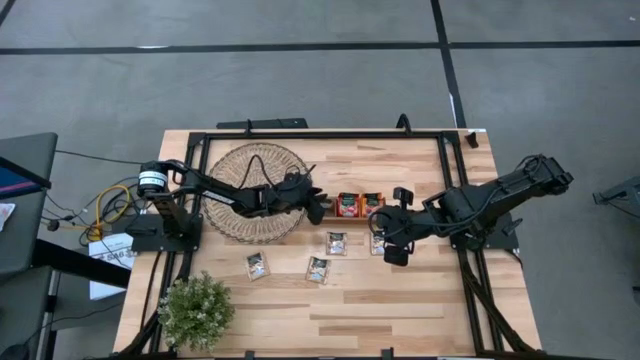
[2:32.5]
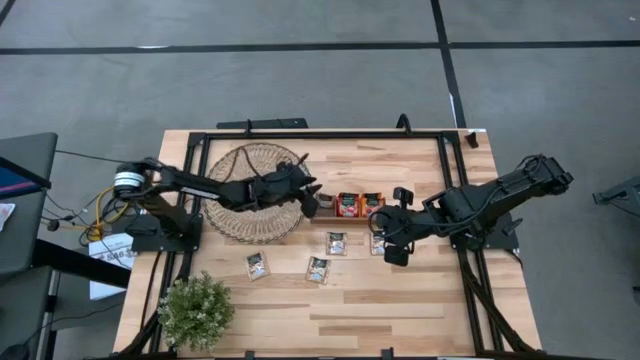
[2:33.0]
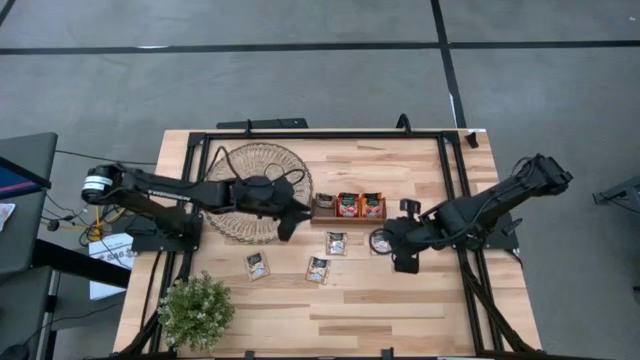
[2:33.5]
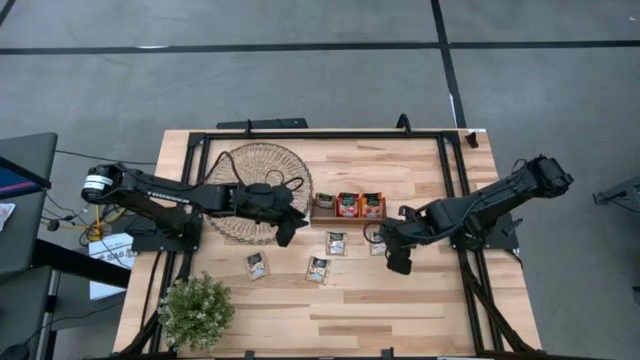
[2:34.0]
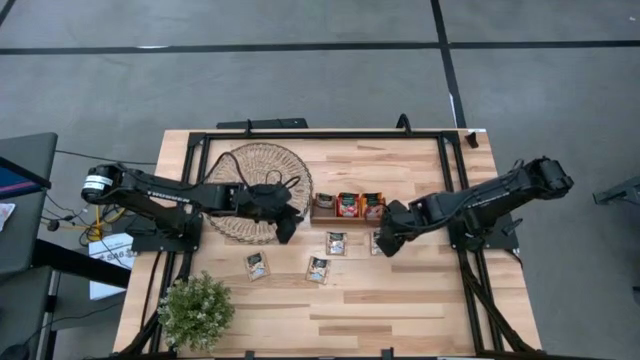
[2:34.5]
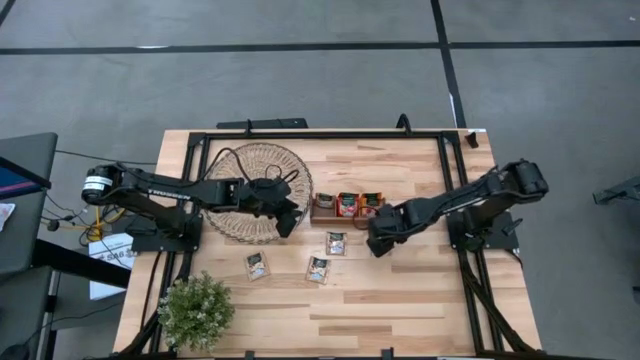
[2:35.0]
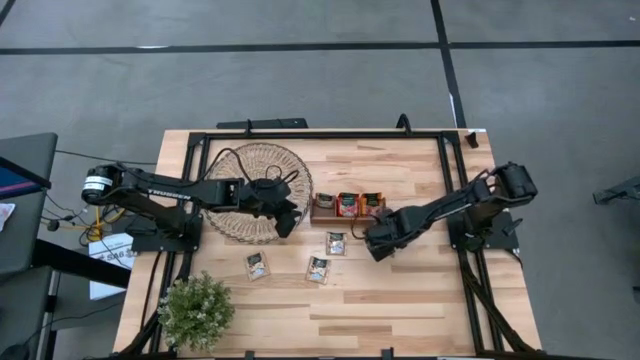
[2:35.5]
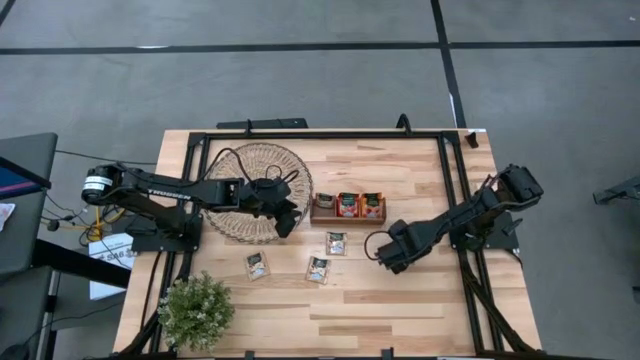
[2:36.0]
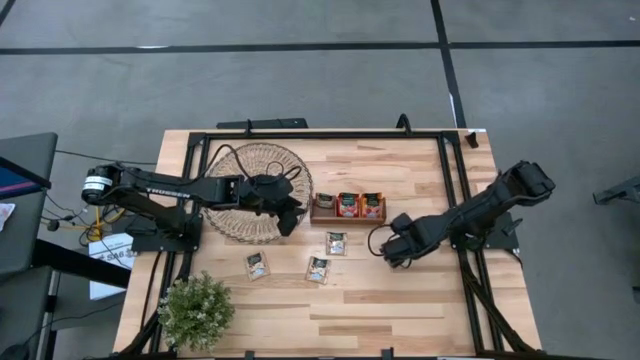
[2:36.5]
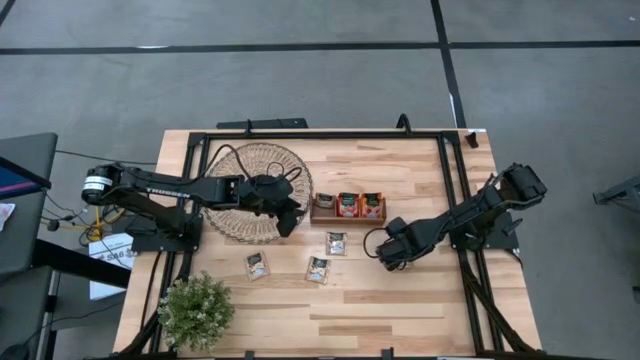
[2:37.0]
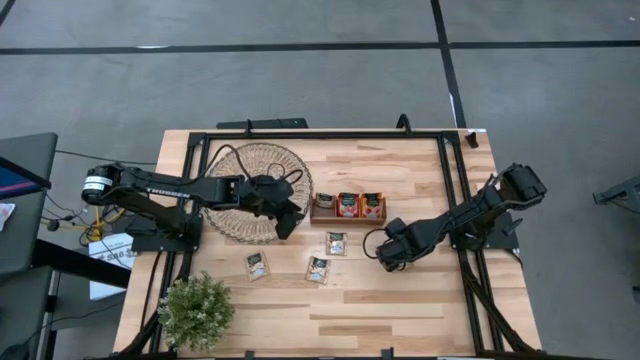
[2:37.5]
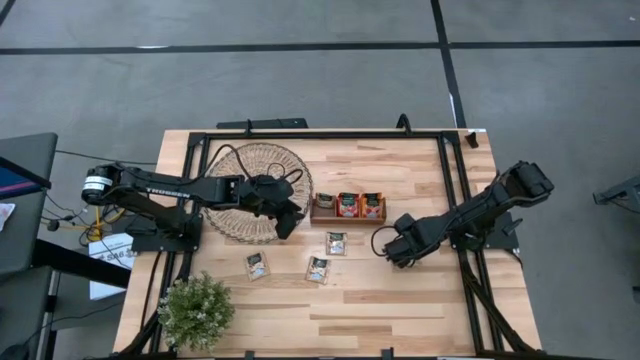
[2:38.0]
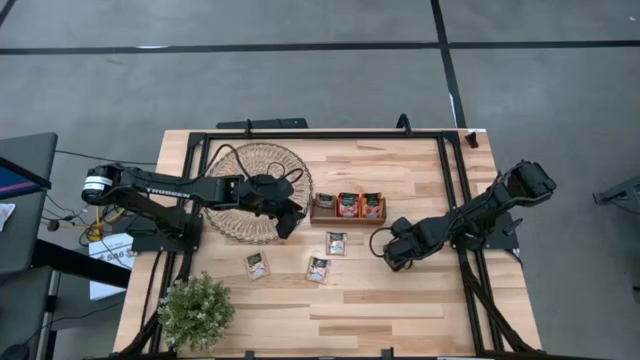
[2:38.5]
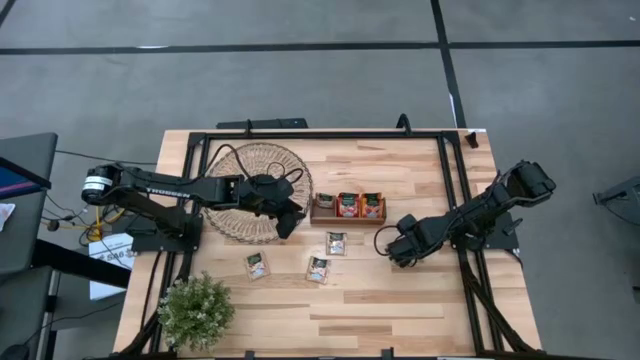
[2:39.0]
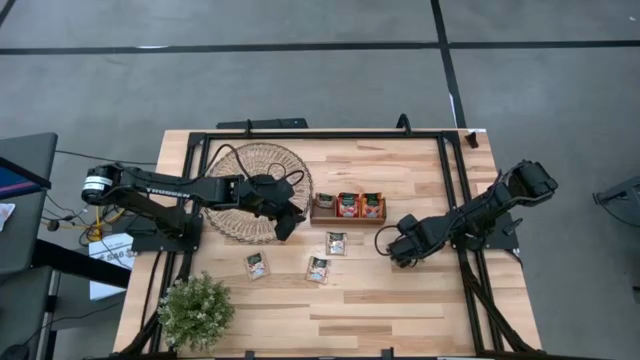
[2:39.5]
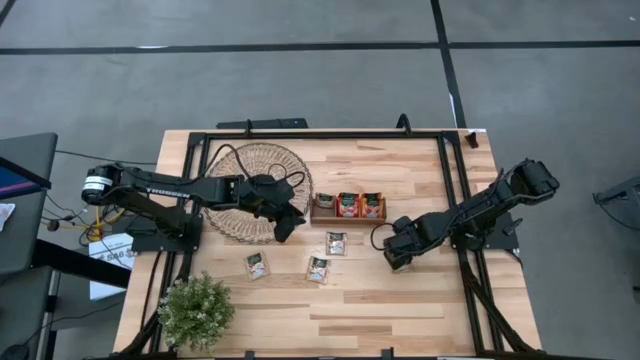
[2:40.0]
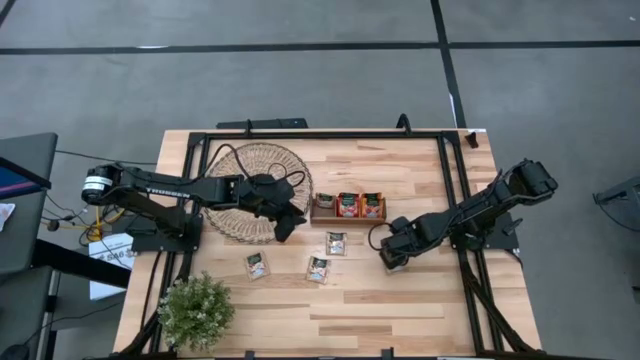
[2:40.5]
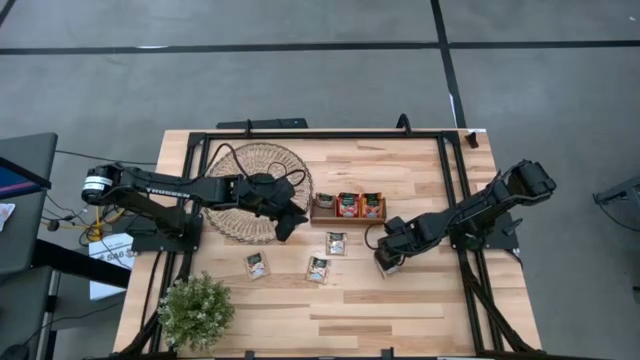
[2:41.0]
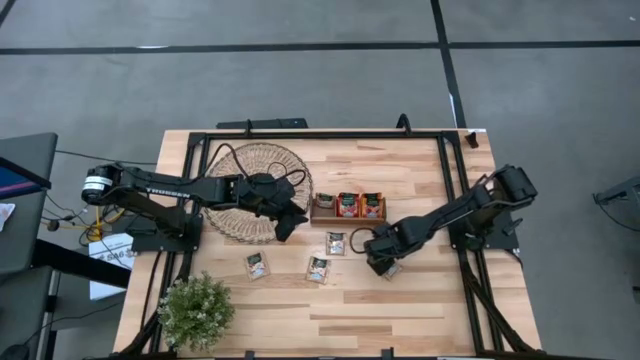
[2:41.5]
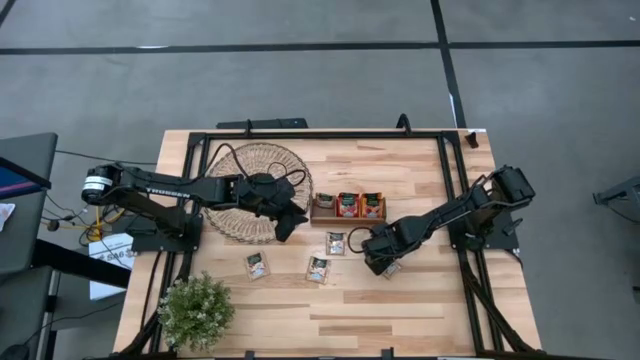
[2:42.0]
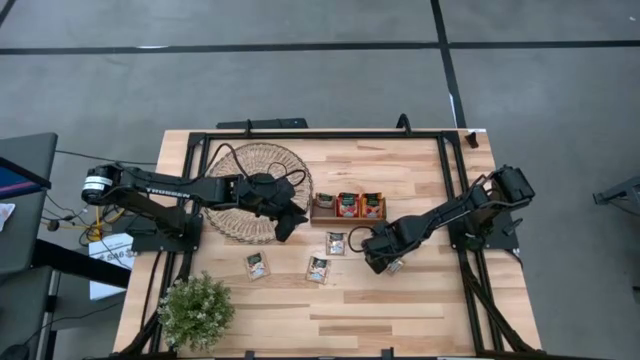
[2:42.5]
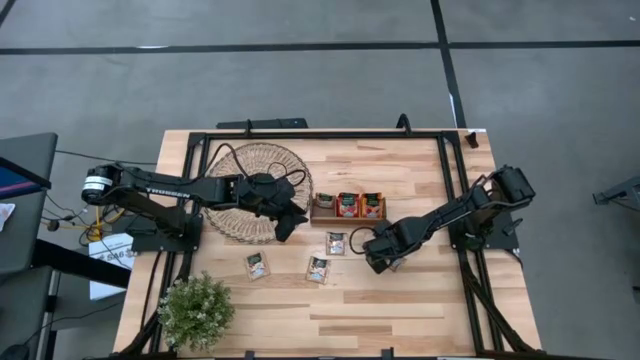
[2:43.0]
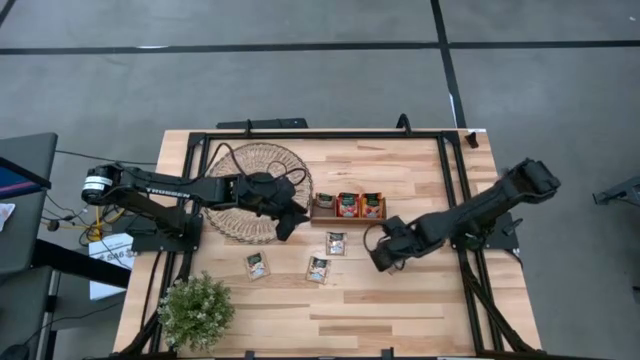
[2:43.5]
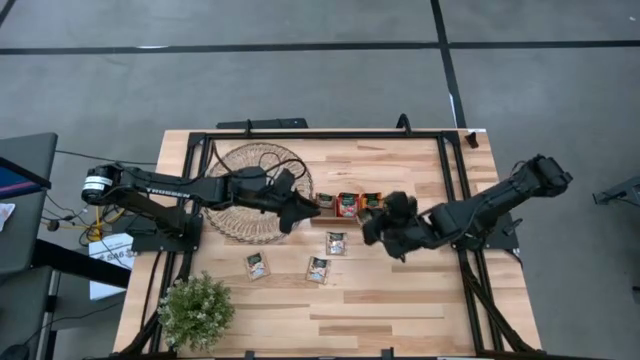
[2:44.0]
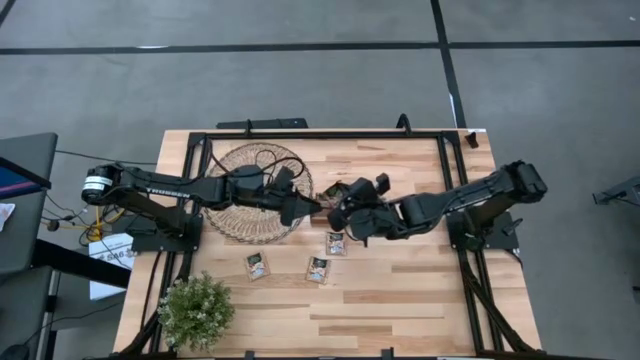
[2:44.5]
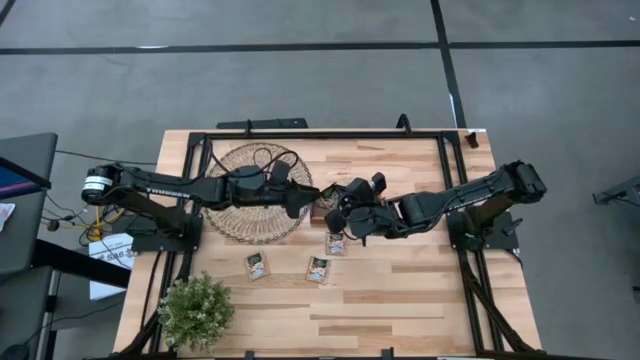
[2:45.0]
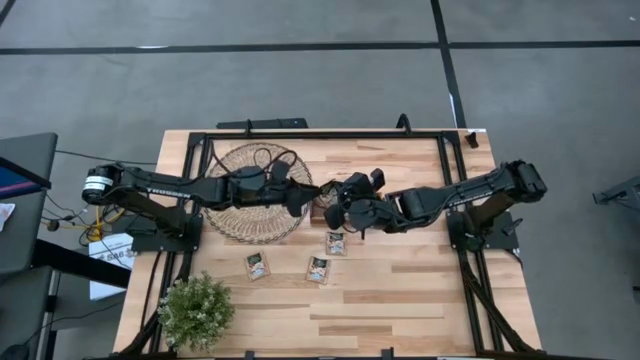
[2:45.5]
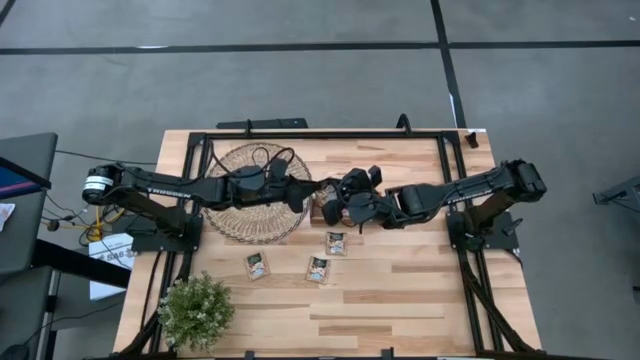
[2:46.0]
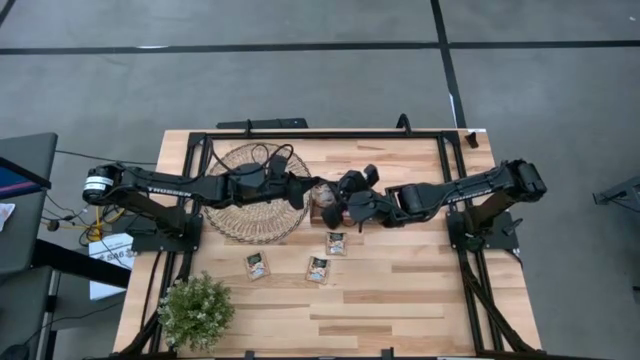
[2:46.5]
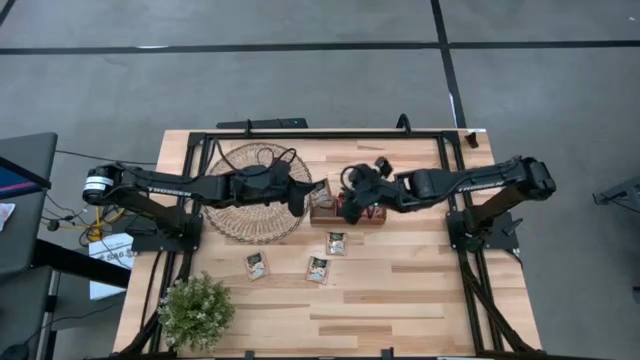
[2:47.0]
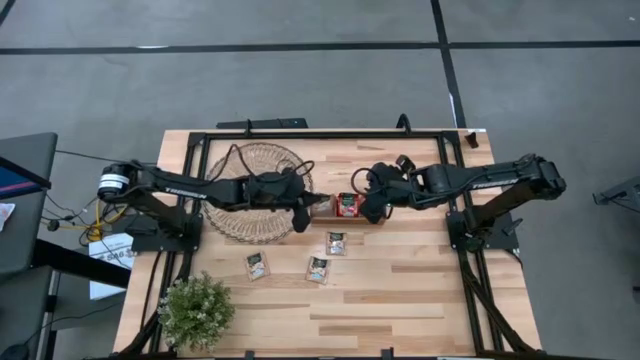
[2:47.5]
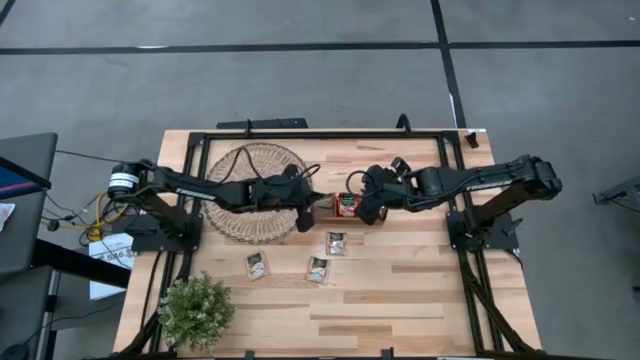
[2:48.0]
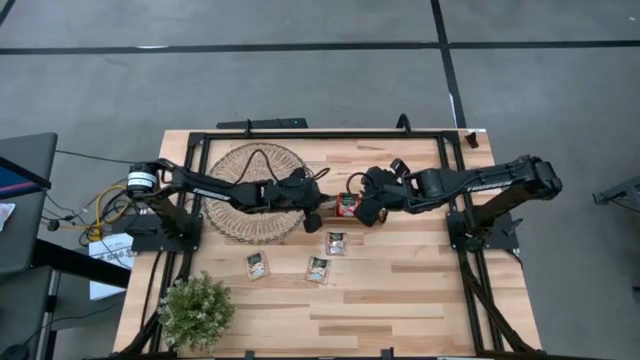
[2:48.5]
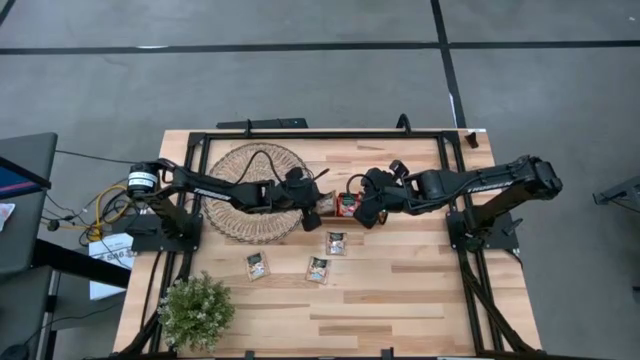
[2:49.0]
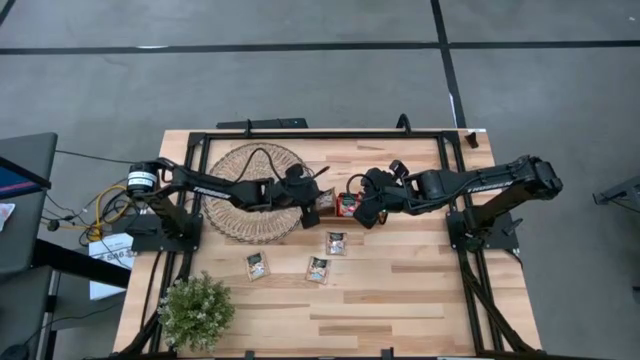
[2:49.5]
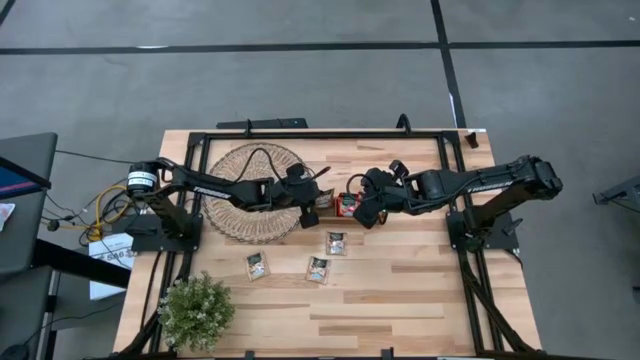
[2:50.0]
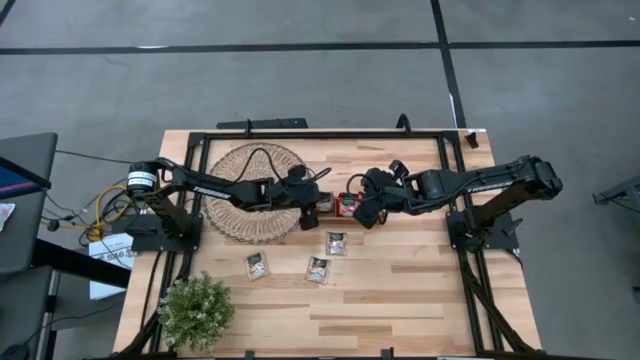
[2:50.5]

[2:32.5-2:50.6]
Task: Pick & Place Tea
Put the brown tea bag into the left section of the wooden organizer

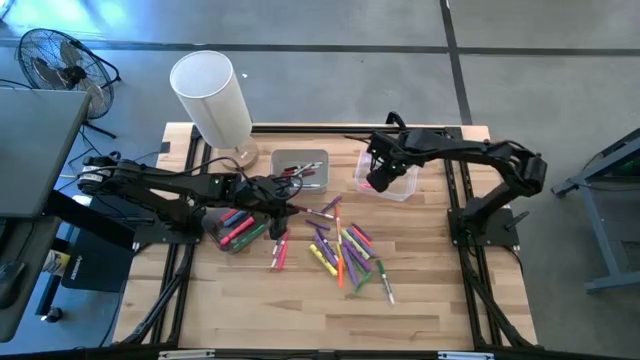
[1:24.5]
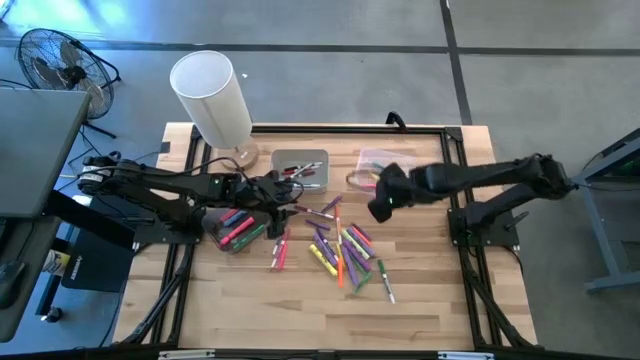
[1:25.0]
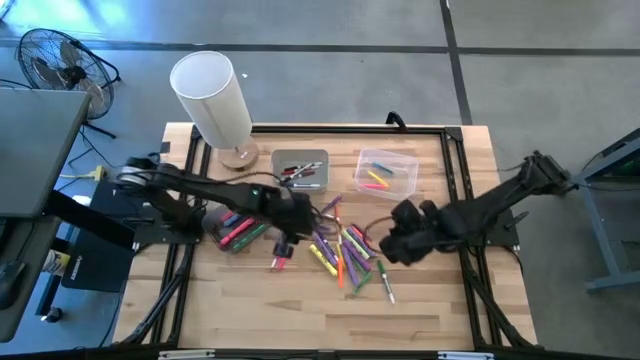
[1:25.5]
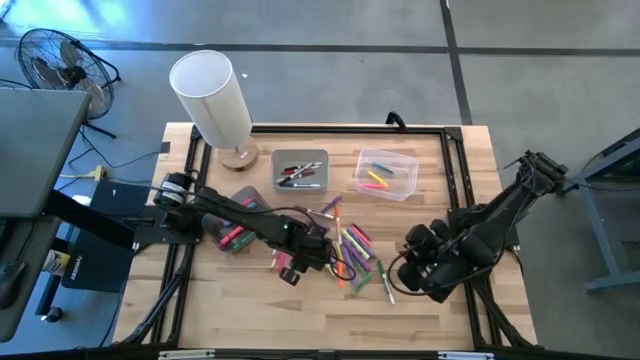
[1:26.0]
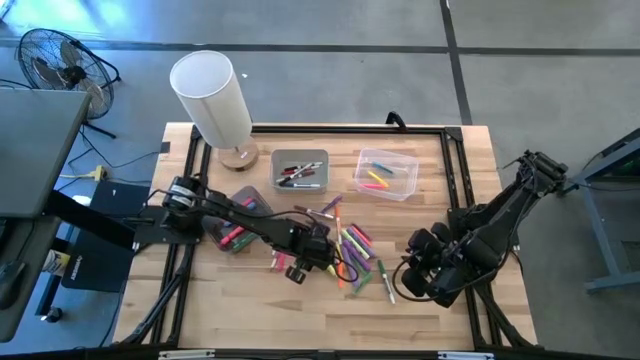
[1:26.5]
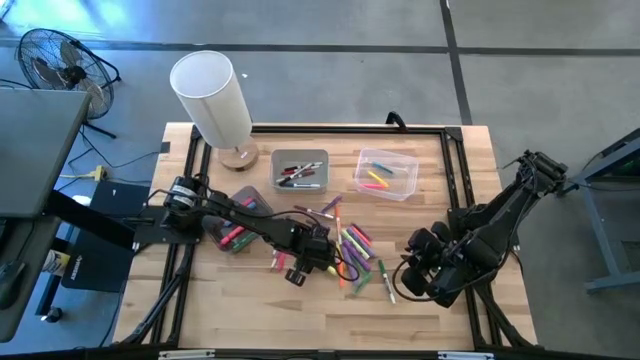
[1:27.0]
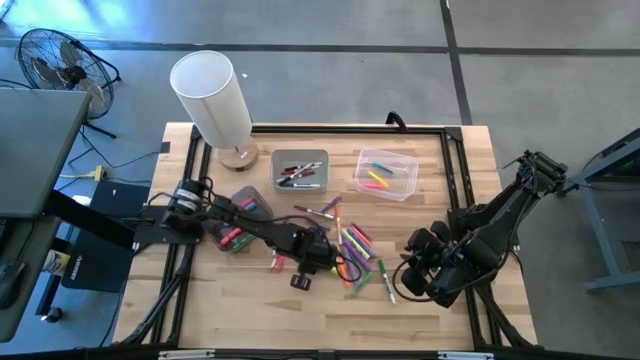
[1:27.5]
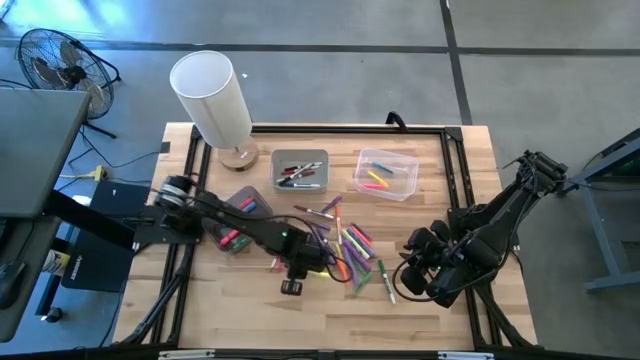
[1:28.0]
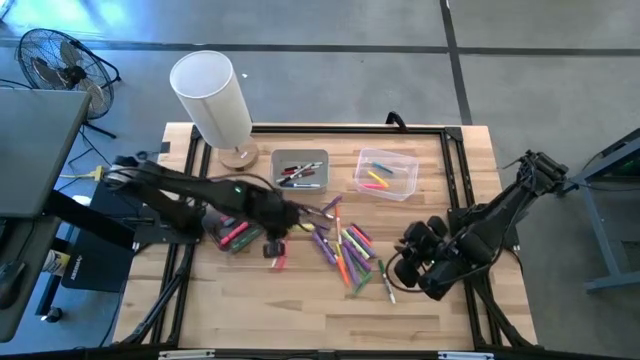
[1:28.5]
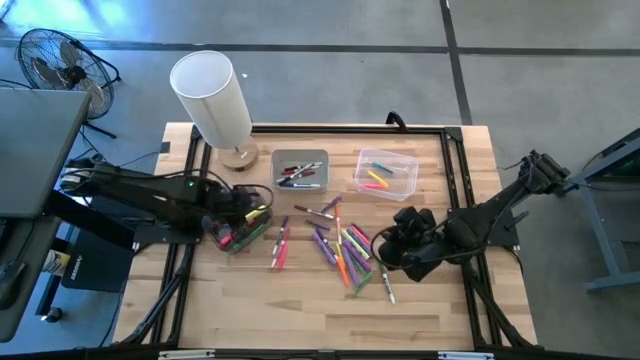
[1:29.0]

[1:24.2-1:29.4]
Task: Pick & Place Markers
Put the yellow highlighter pen into the black bin
